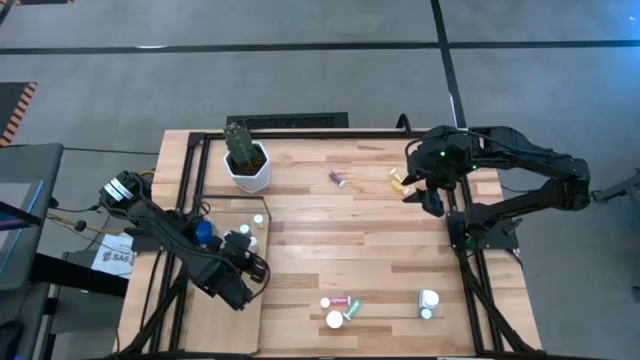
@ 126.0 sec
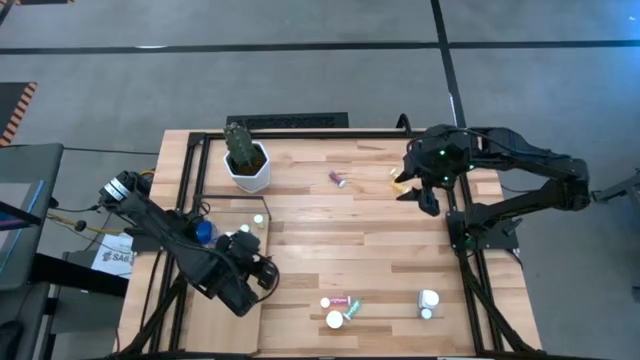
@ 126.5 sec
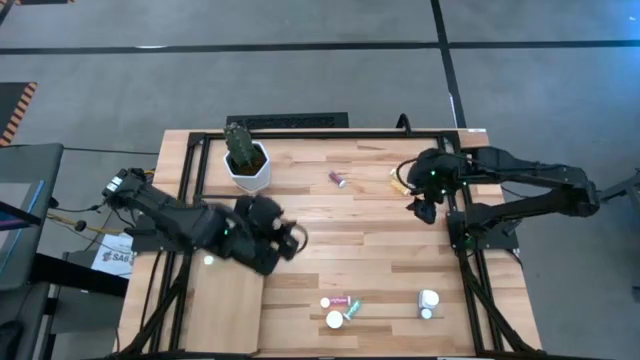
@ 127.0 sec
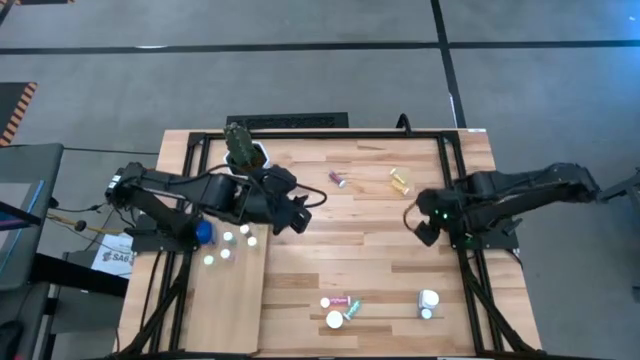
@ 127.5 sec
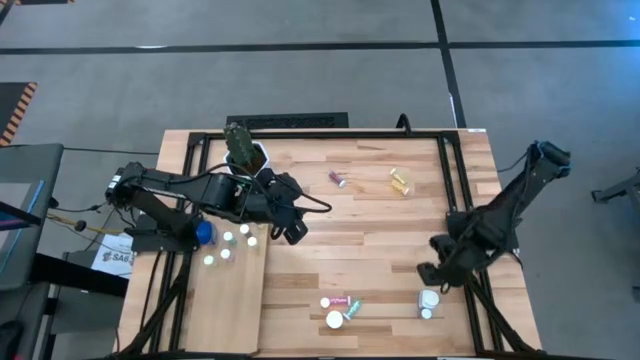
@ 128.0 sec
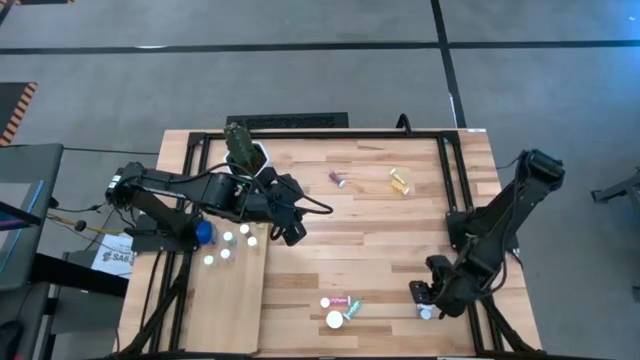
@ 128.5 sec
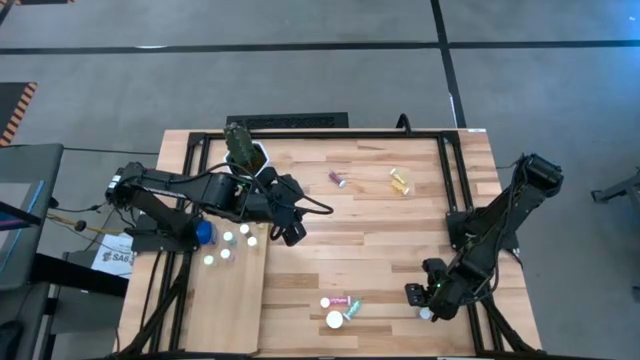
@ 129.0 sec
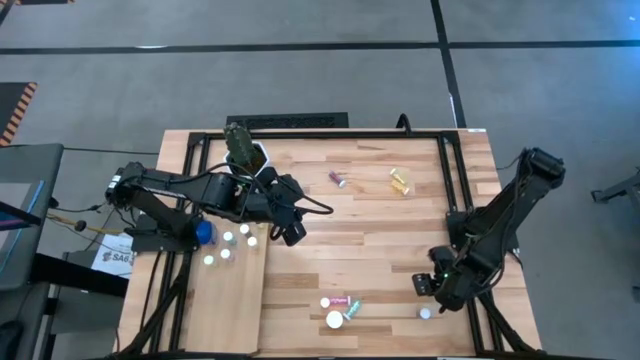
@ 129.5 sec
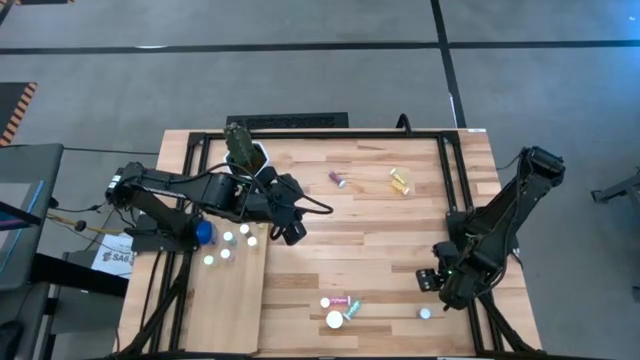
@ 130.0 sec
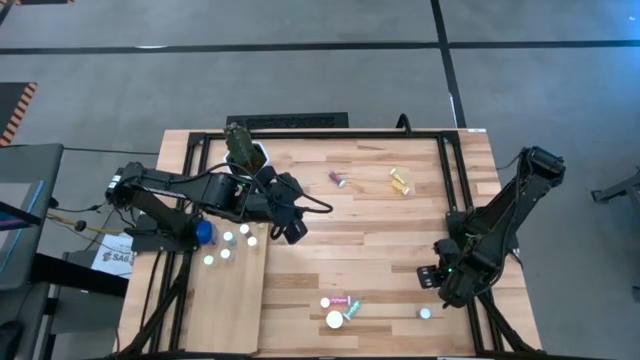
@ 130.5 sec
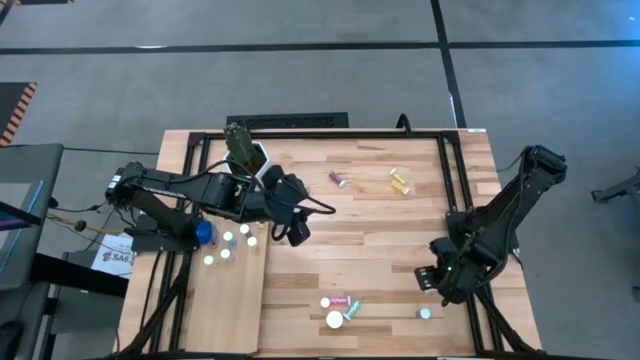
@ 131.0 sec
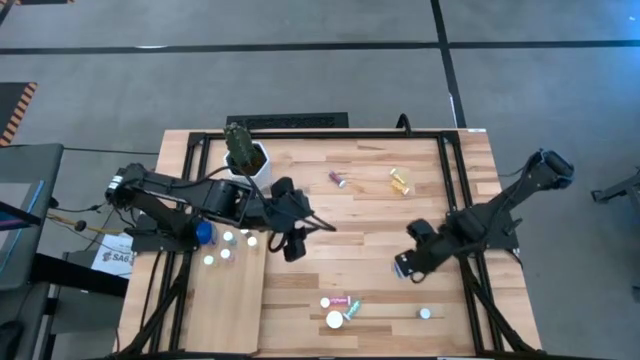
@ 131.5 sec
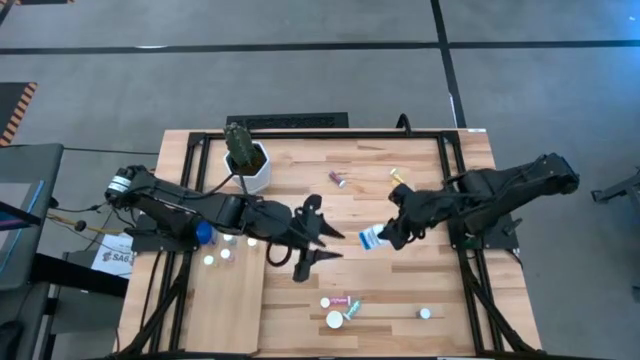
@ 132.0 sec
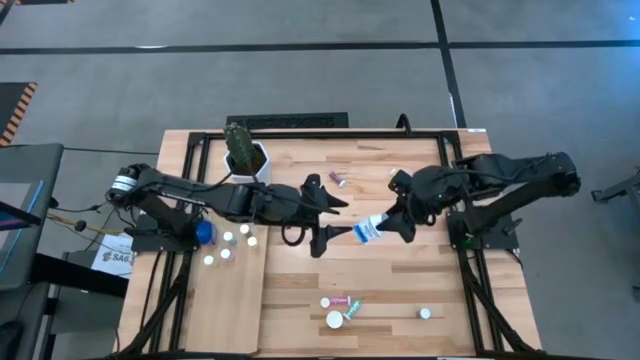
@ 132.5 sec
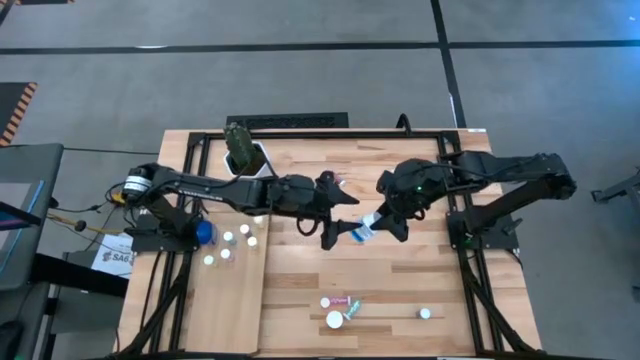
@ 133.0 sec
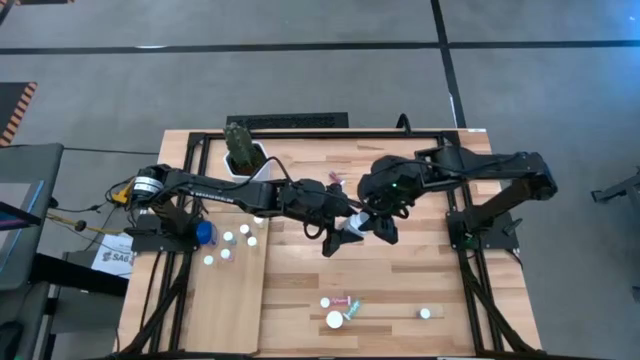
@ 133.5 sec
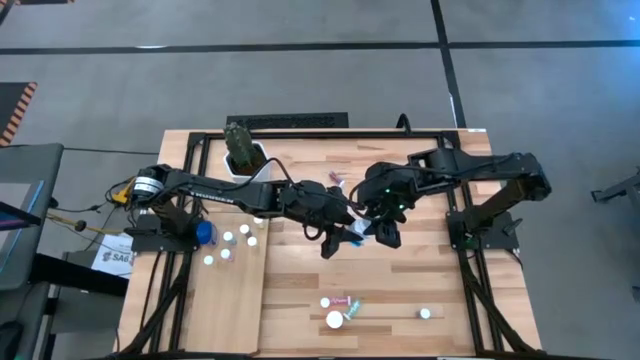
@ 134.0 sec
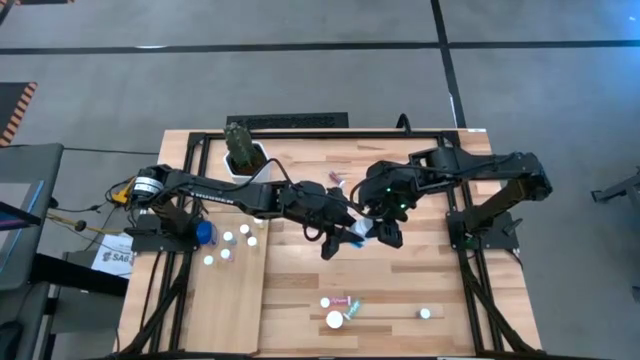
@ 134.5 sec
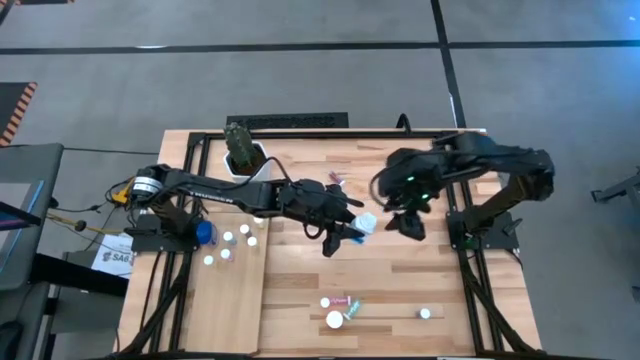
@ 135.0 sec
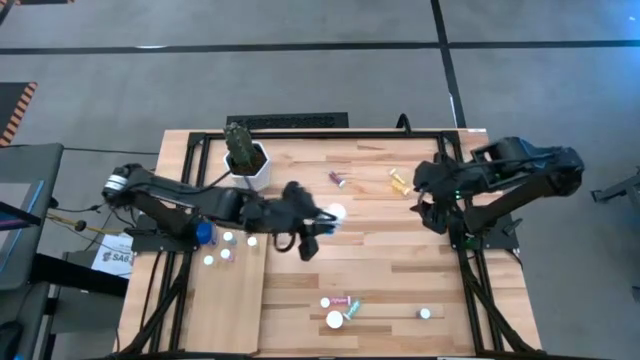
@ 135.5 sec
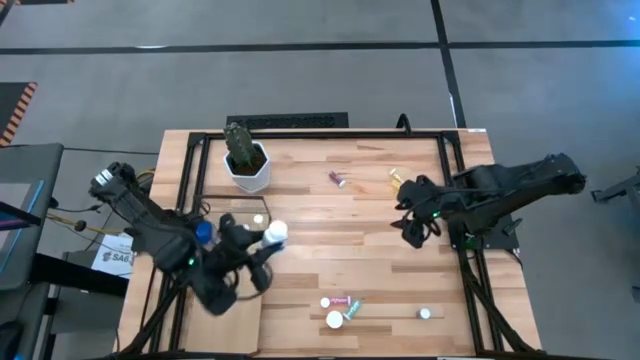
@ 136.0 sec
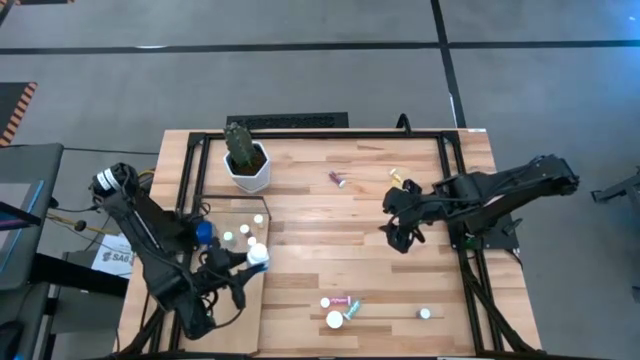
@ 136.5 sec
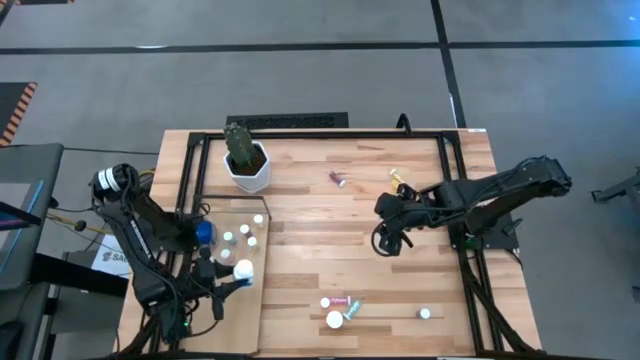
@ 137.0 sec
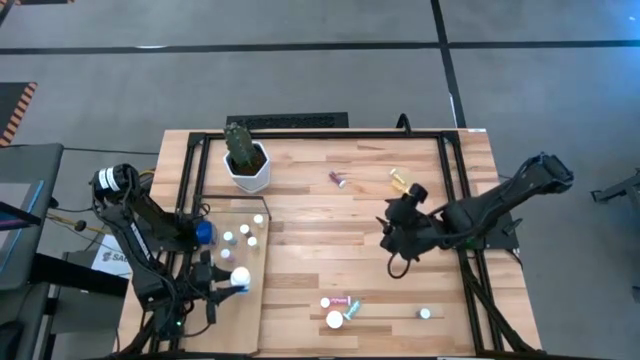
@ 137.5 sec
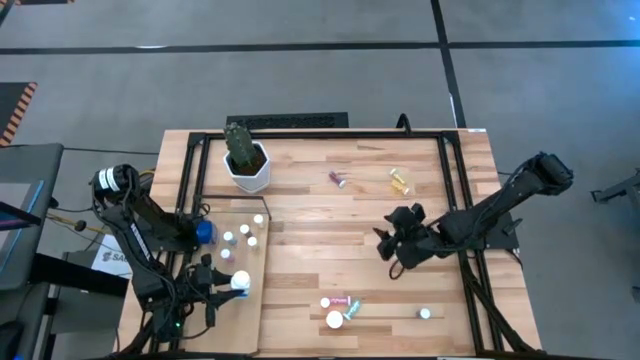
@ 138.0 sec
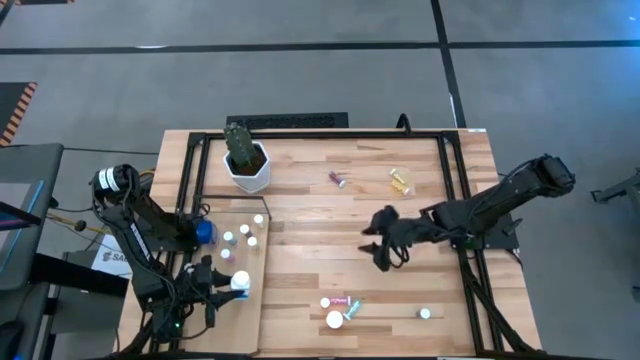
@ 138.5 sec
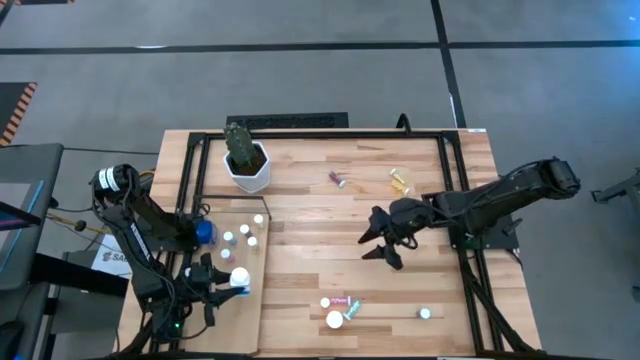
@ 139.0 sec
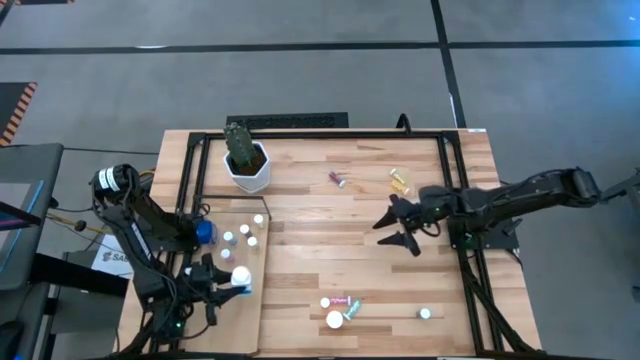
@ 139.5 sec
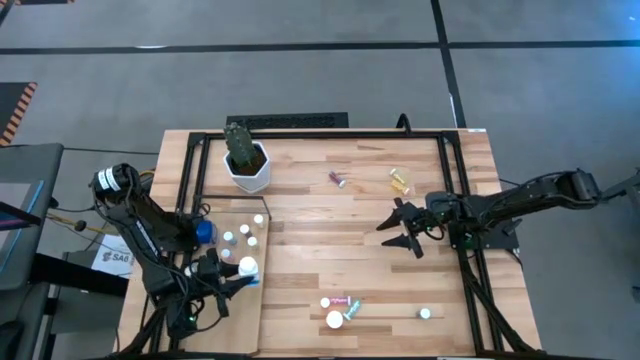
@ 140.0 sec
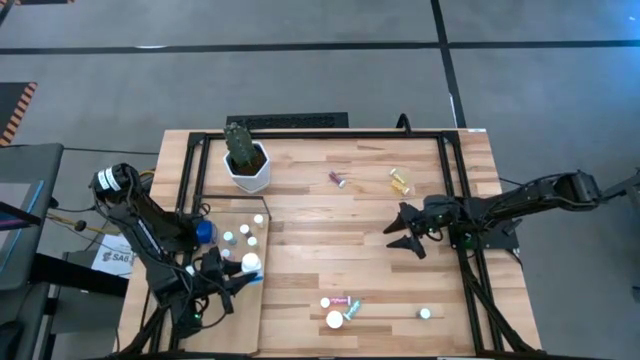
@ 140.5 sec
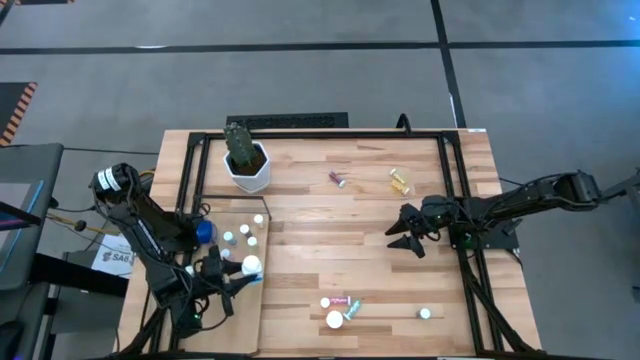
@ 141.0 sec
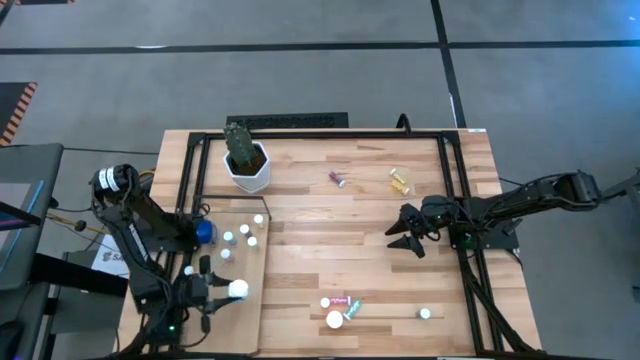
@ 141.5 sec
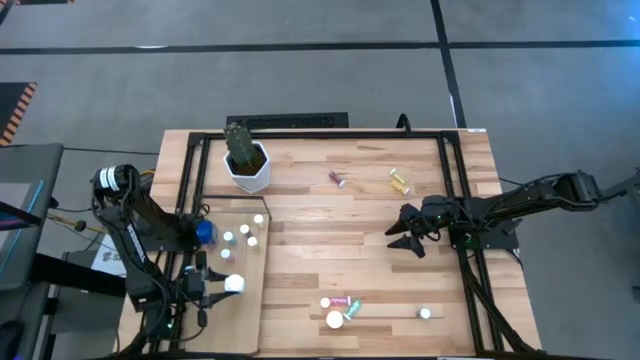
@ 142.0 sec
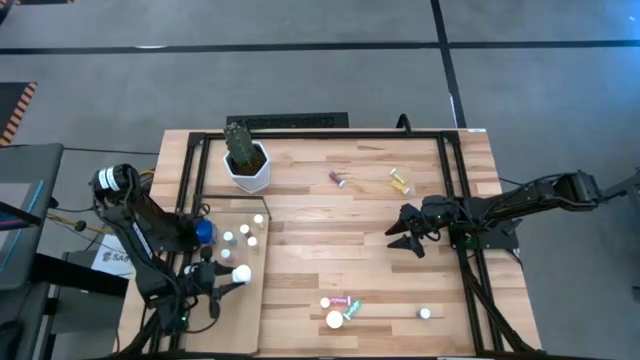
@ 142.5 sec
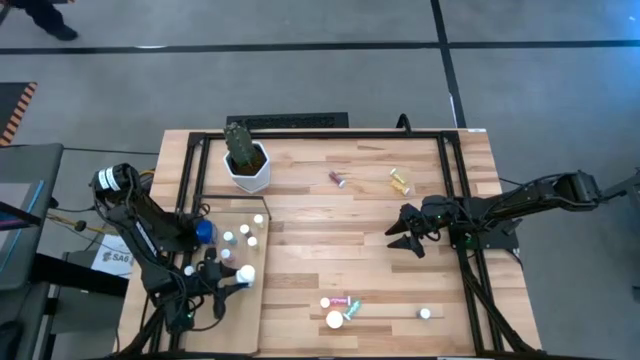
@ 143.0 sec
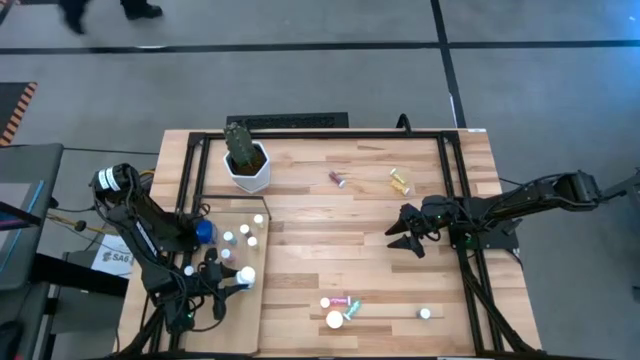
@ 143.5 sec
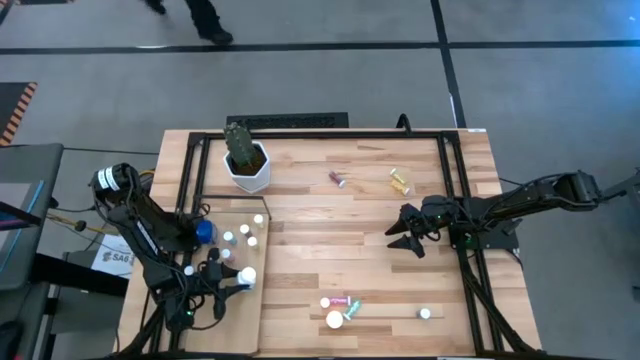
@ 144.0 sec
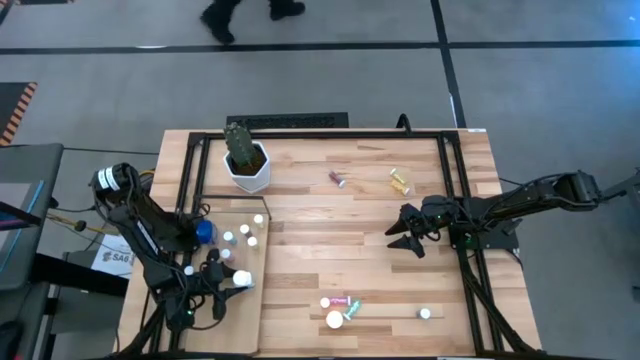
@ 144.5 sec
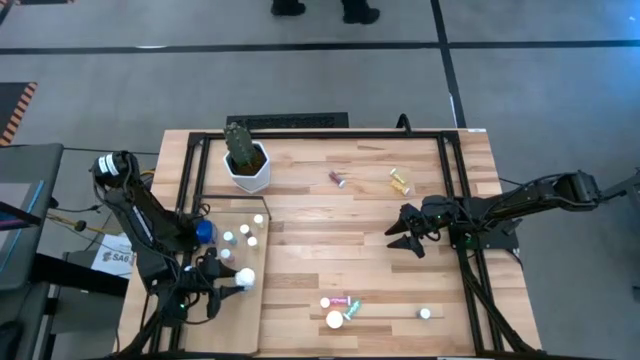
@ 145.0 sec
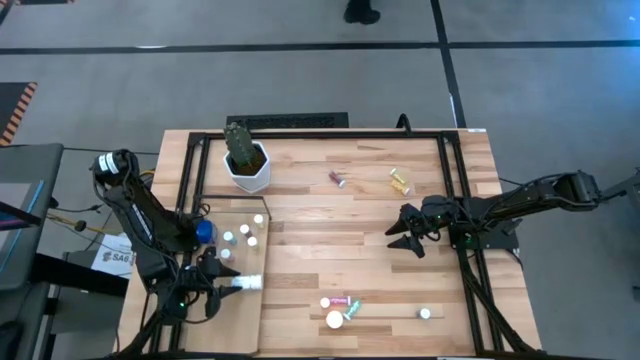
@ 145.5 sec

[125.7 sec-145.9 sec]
Task: Pick and place medicine bottles onto shelf by color
Put the white pill bottle on the shelf
